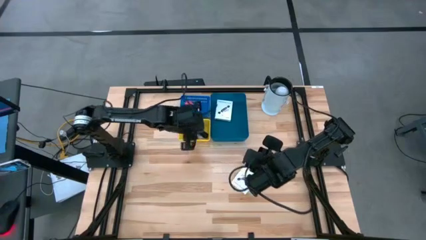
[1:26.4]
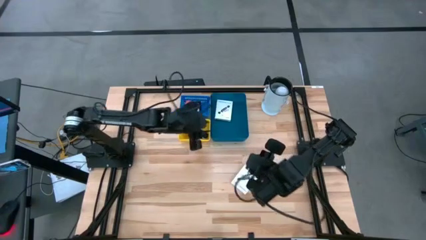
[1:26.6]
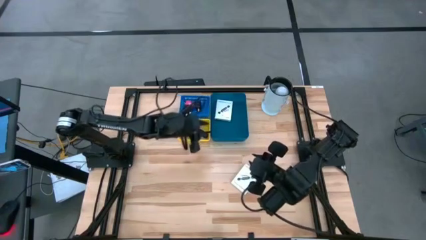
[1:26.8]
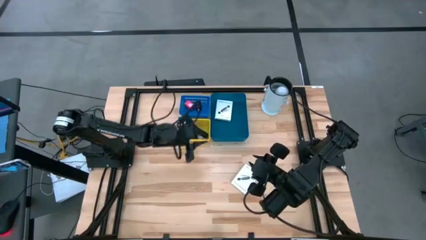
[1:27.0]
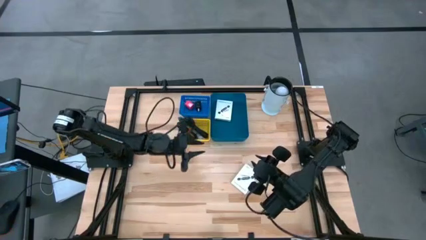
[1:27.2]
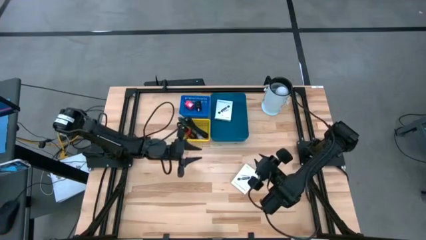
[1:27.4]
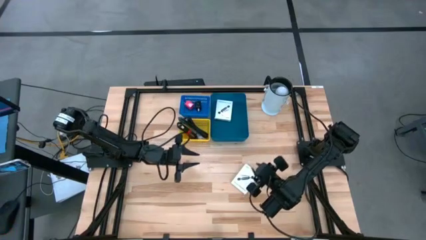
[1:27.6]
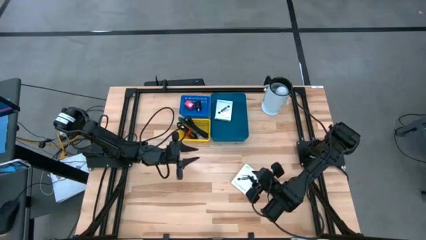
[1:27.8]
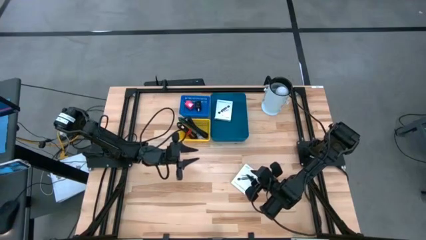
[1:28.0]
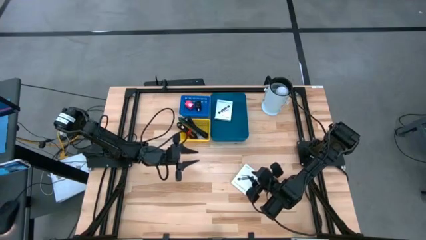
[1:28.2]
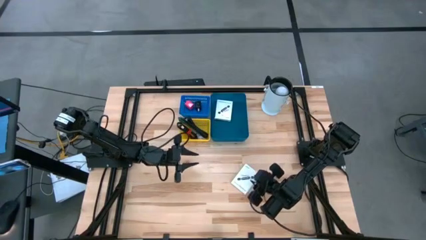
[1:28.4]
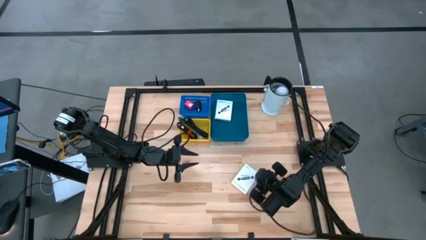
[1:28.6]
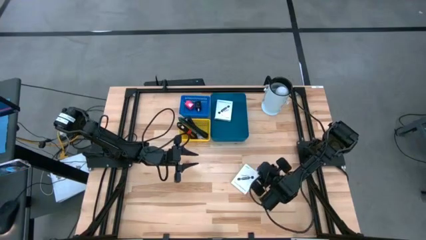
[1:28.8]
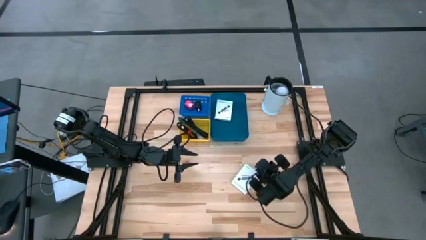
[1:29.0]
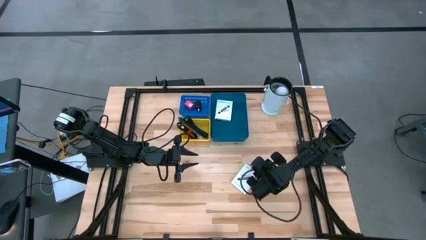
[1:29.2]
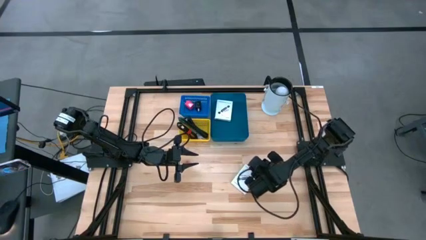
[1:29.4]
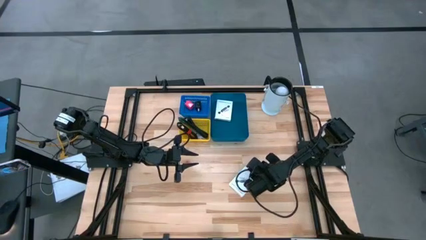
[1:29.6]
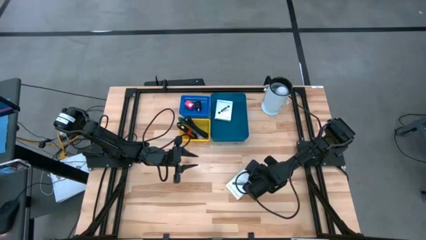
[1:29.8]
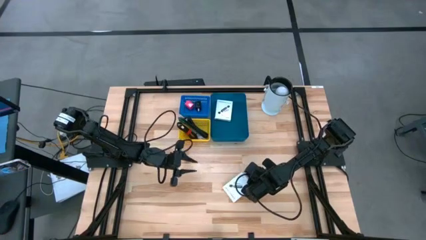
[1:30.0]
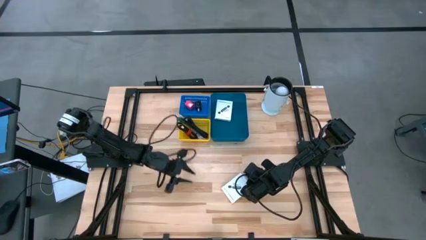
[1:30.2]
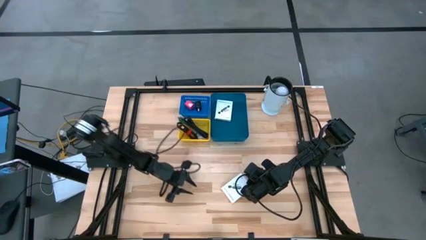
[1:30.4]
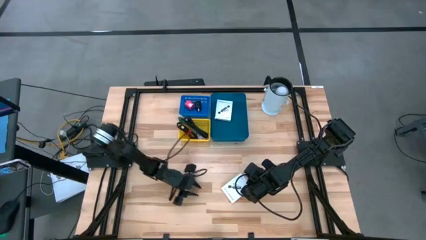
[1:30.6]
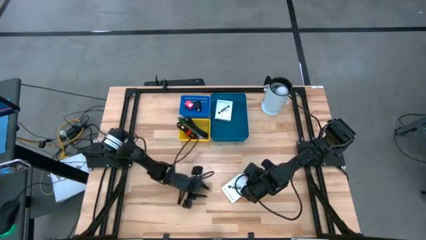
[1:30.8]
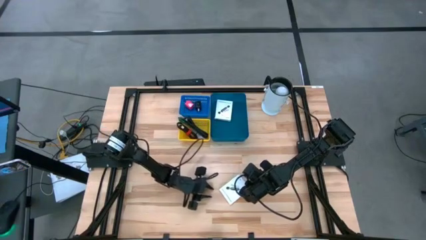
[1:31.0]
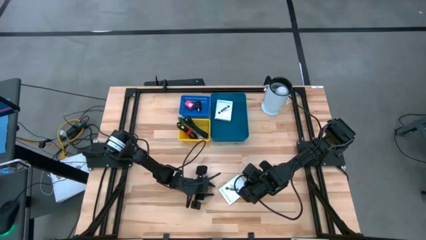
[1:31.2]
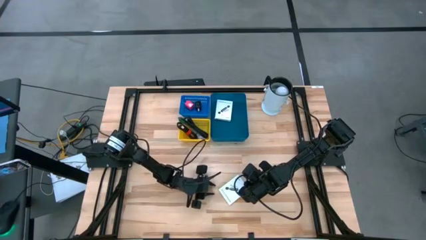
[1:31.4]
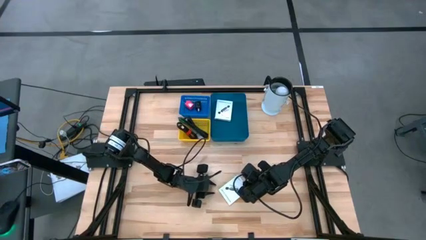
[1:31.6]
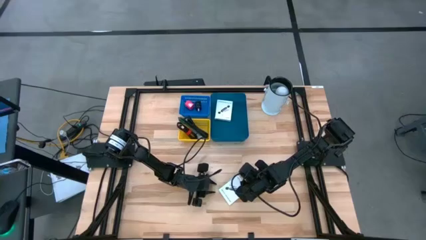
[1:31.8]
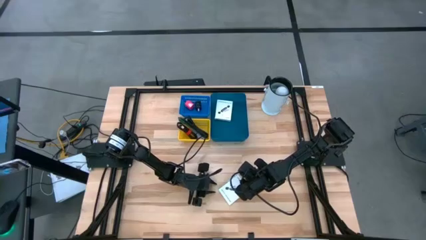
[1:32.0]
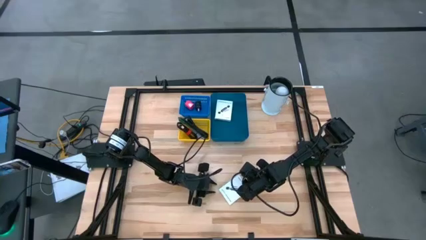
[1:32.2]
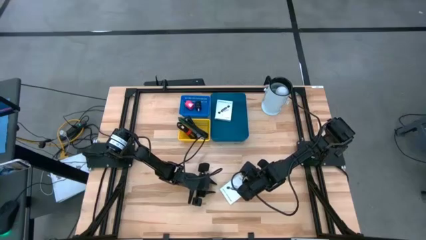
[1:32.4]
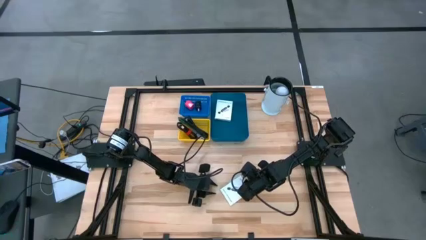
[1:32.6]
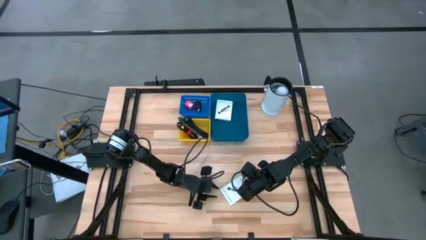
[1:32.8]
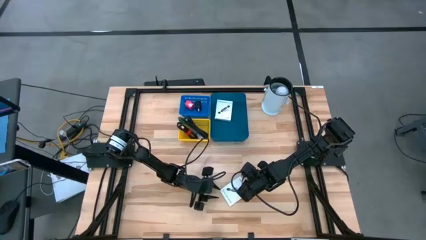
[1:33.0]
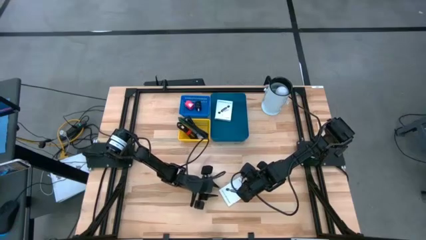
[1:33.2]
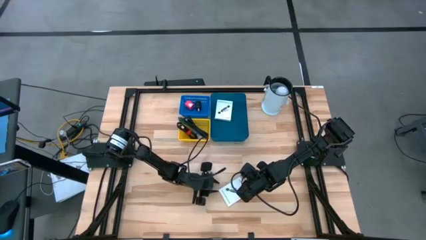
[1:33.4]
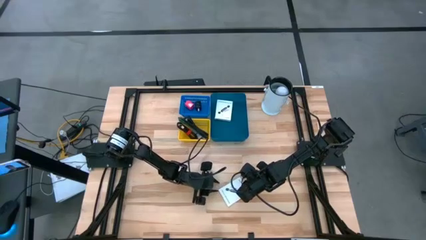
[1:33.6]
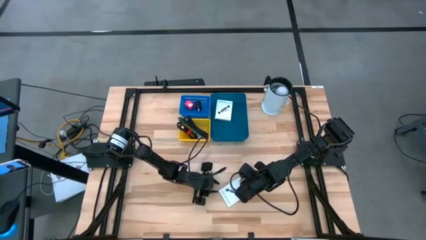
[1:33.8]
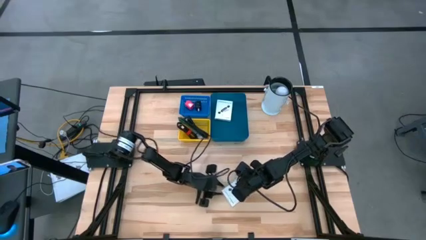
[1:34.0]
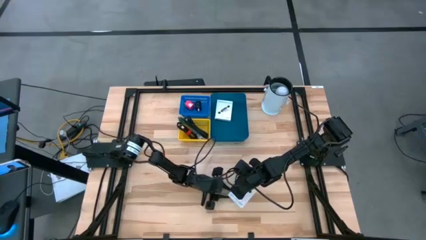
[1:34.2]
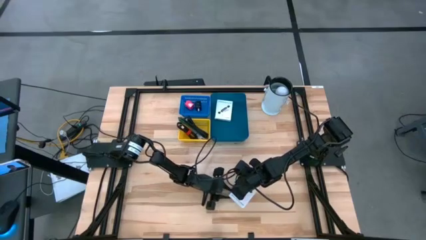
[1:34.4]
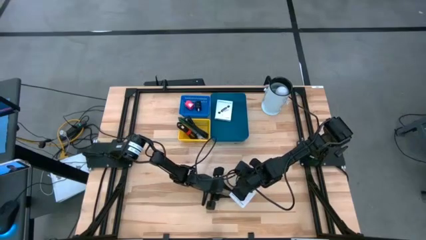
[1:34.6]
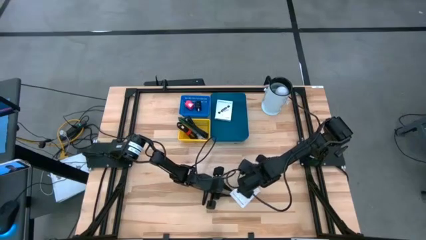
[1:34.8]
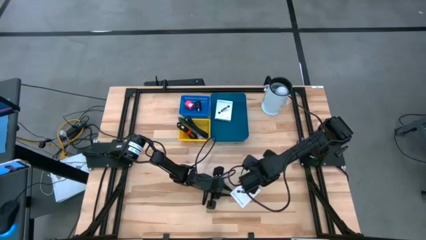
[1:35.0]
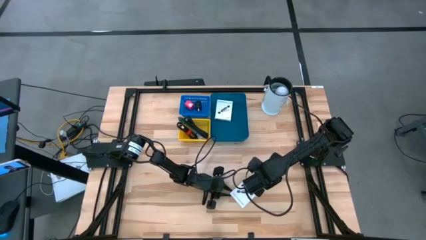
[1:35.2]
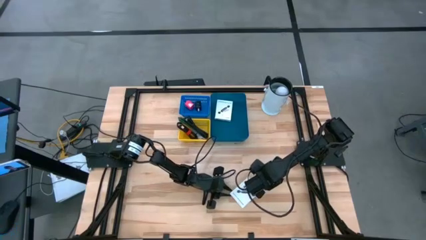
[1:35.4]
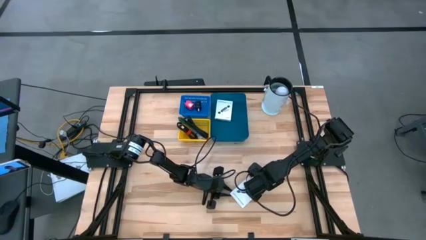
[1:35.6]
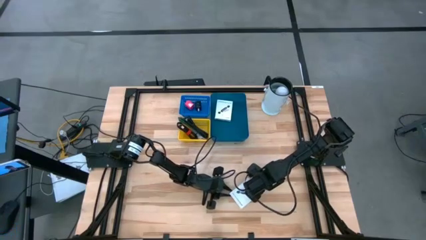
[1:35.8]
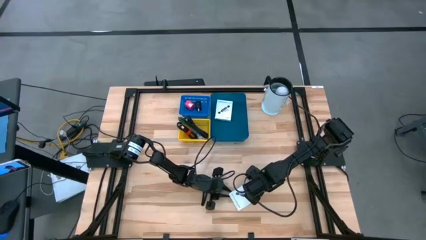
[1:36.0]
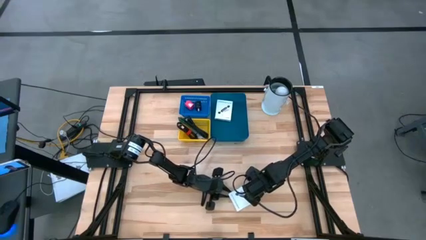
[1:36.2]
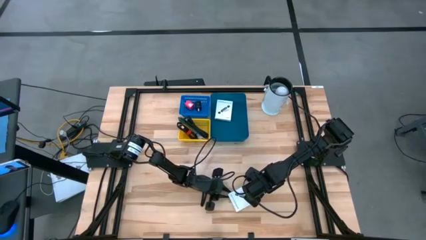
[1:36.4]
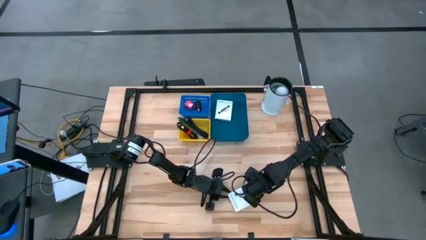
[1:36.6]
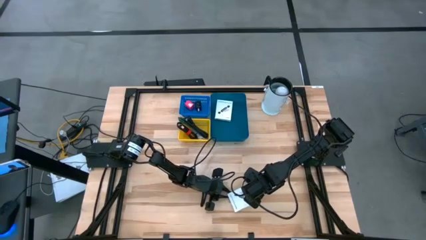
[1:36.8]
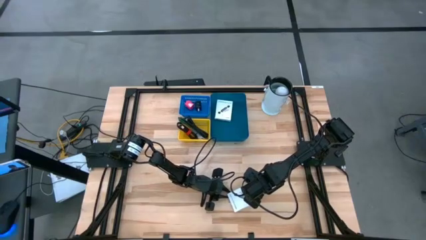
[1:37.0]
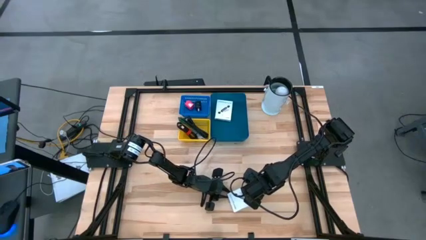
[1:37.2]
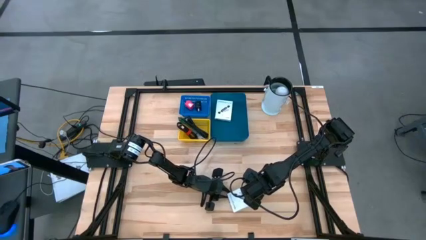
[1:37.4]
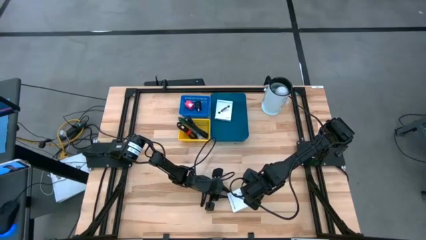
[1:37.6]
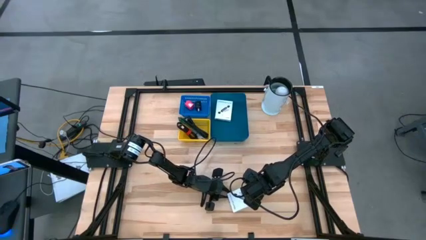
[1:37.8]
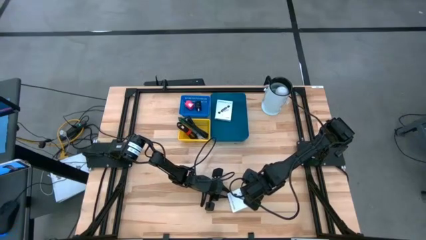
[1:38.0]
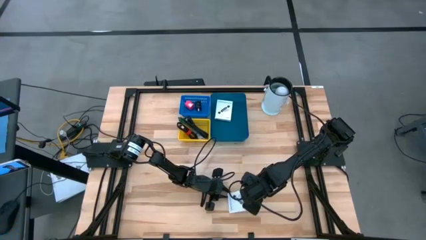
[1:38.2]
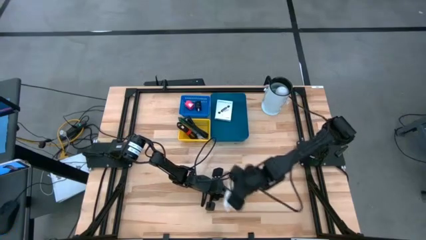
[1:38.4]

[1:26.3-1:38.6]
Task: Pick and place items into bin
Put the card reader into the dark blue bin

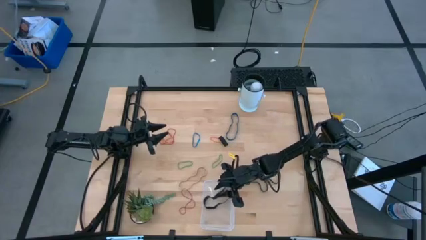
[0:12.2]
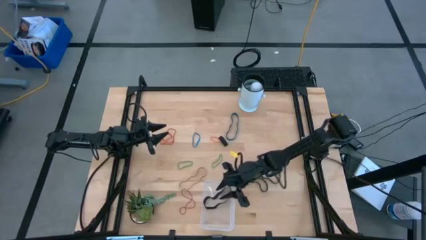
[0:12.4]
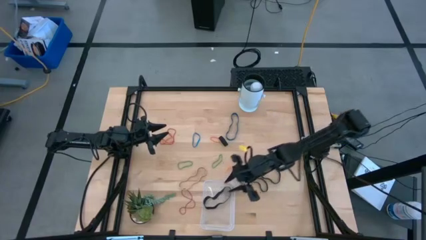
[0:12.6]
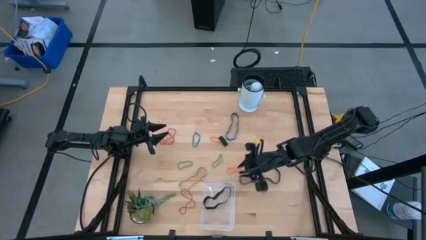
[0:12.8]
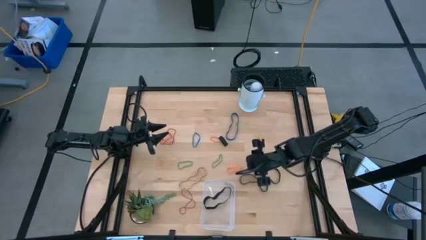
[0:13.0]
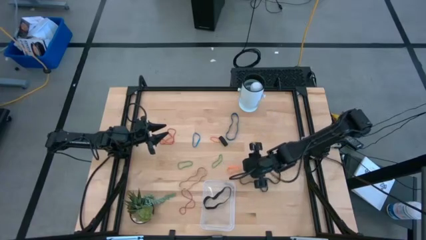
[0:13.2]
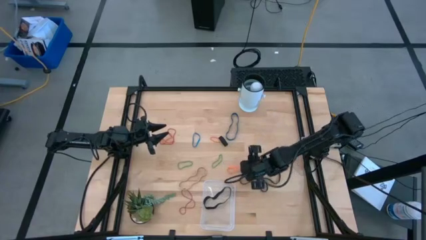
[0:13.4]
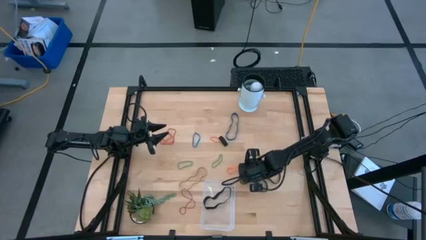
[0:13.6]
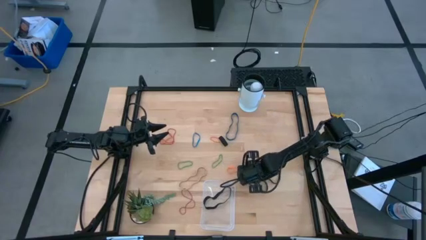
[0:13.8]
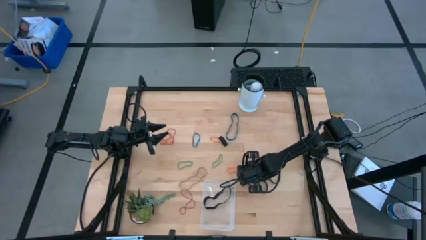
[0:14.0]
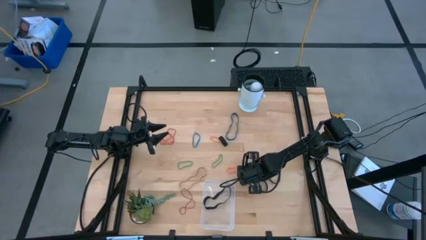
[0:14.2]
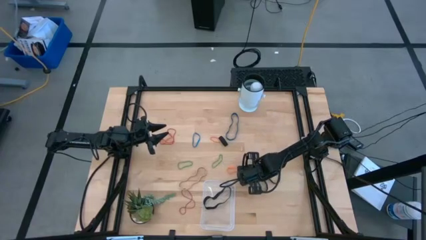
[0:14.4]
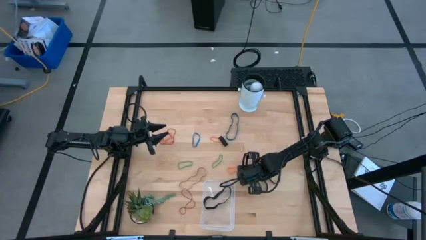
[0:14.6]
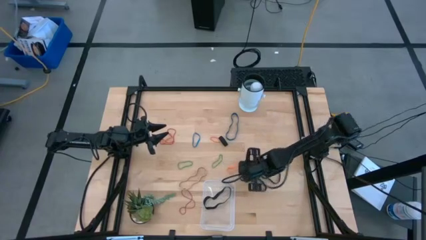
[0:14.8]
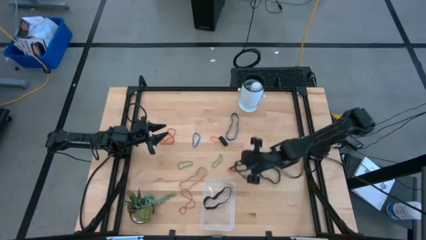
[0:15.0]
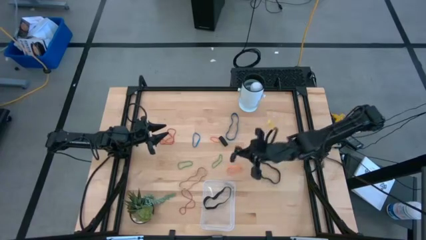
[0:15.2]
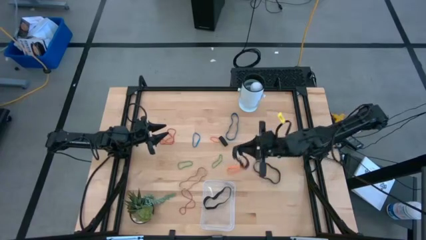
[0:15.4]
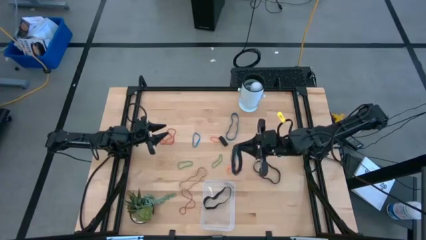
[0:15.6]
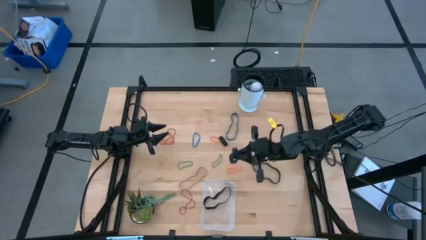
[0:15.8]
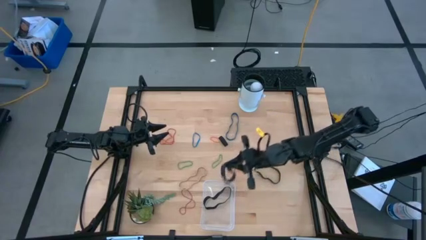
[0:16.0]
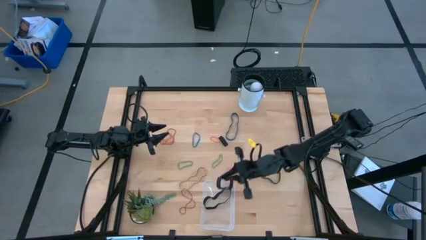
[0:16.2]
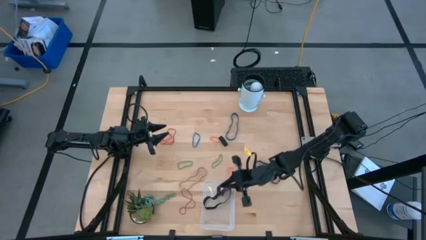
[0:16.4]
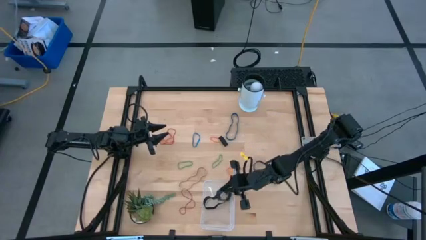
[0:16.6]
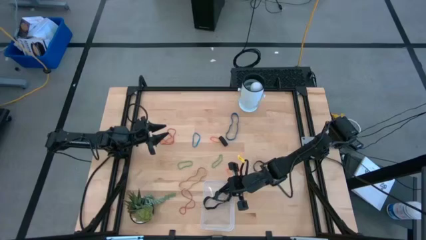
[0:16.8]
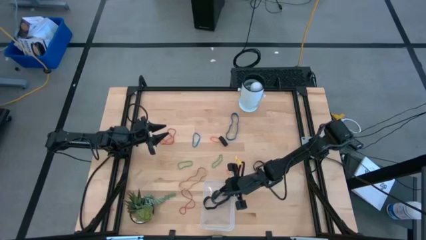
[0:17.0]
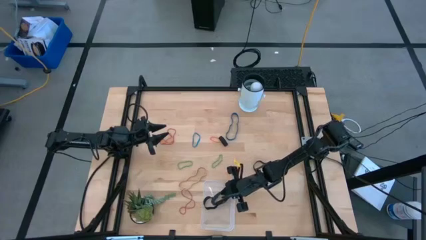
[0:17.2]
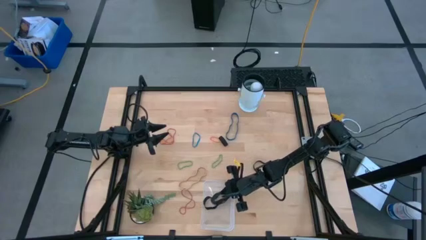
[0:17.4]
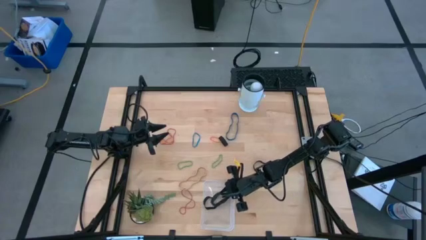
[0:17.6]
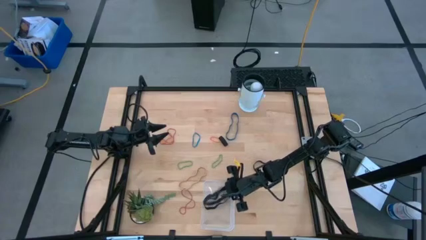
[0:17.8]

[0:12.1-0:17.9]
Task: Pick and place rubber bands into bin
Put the black rubber band into the transparent bin
